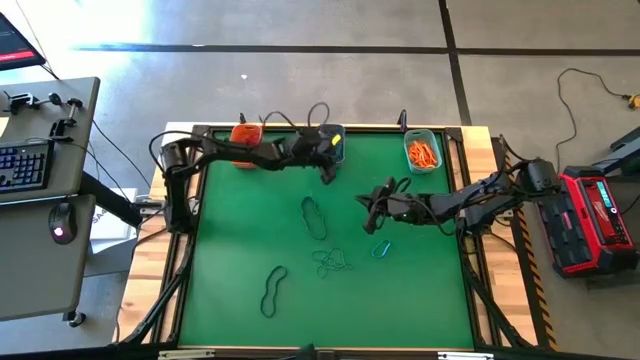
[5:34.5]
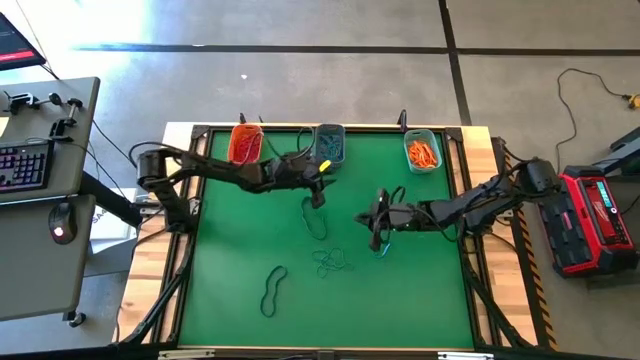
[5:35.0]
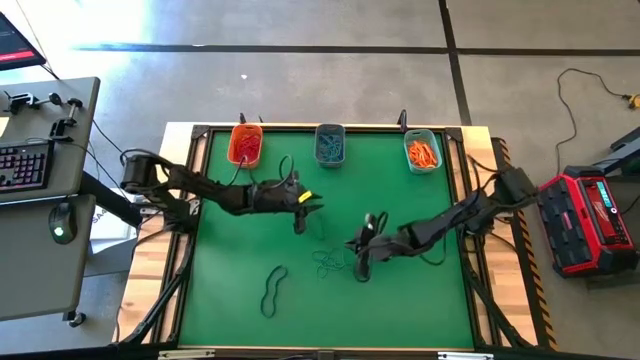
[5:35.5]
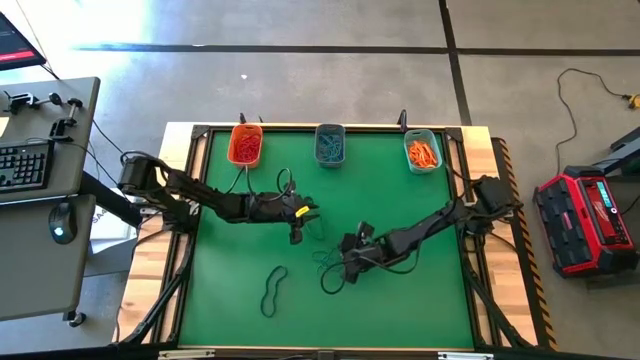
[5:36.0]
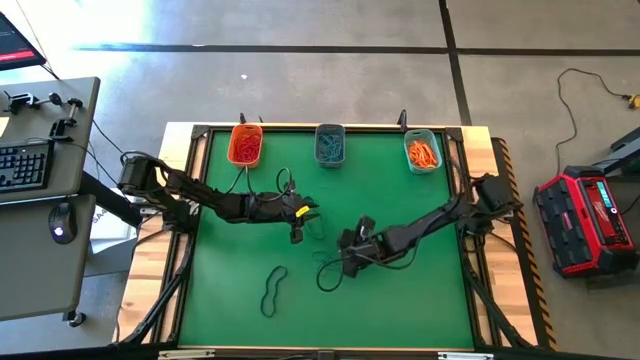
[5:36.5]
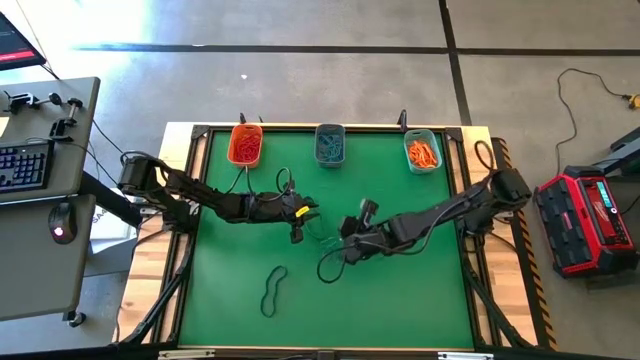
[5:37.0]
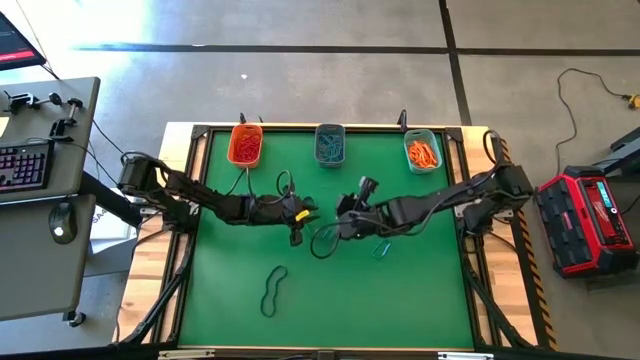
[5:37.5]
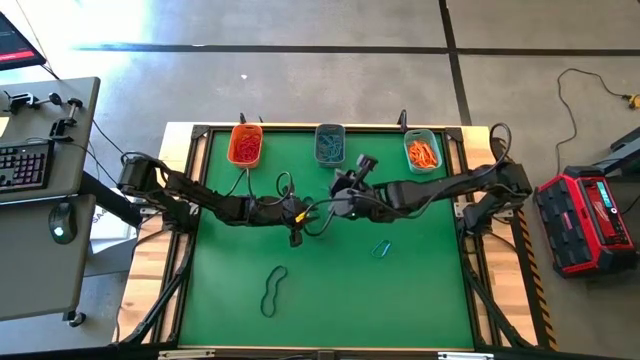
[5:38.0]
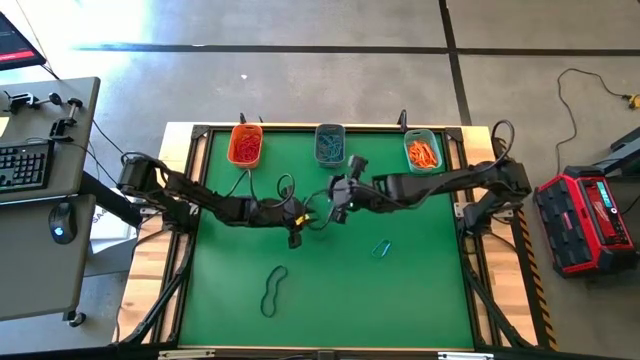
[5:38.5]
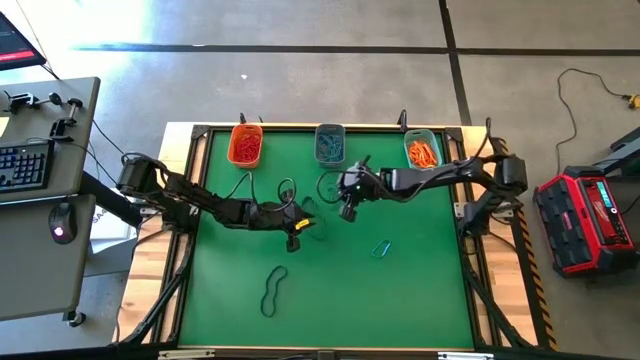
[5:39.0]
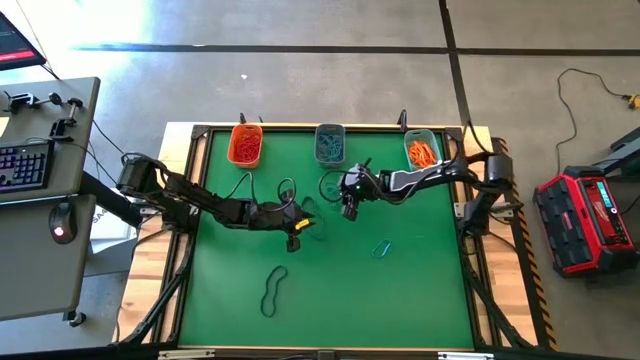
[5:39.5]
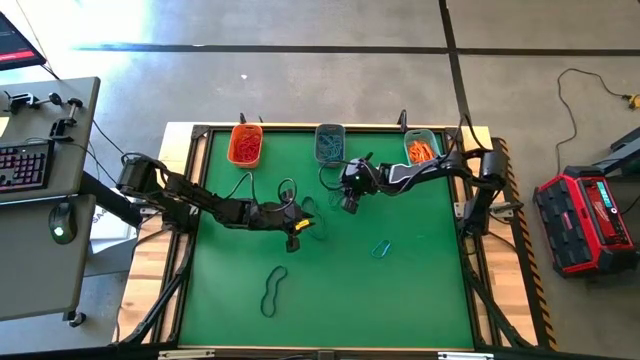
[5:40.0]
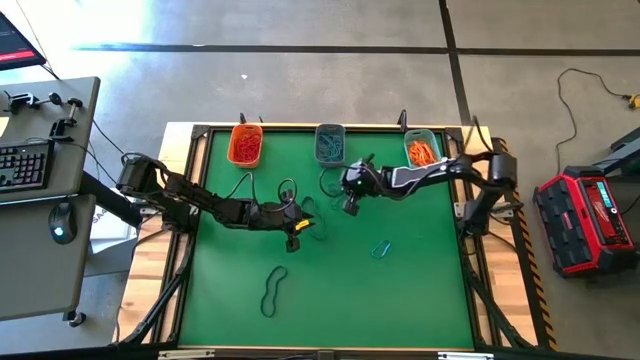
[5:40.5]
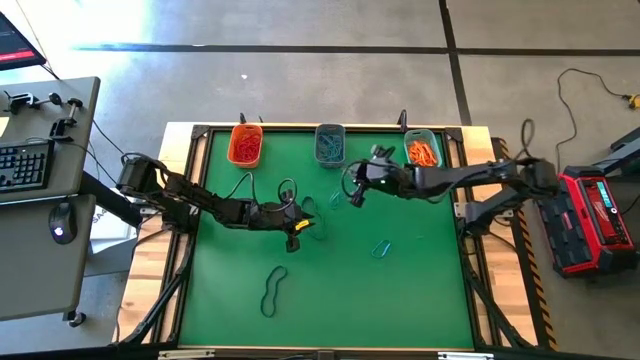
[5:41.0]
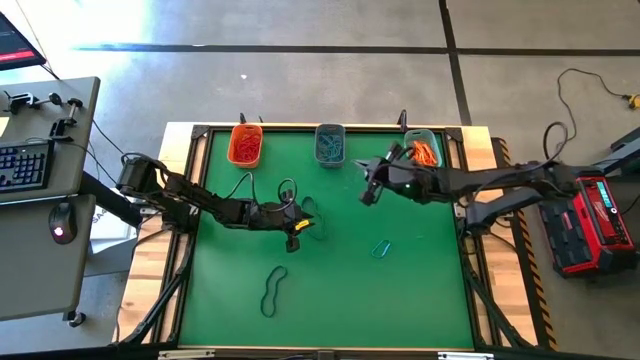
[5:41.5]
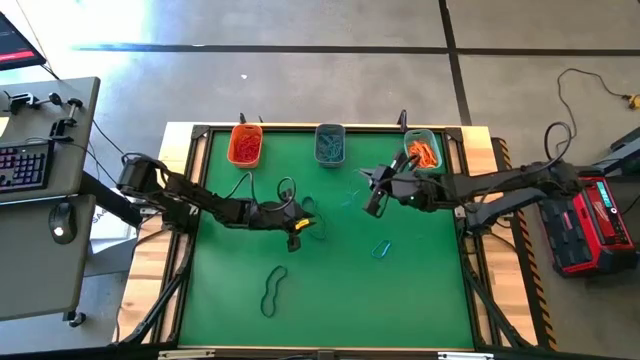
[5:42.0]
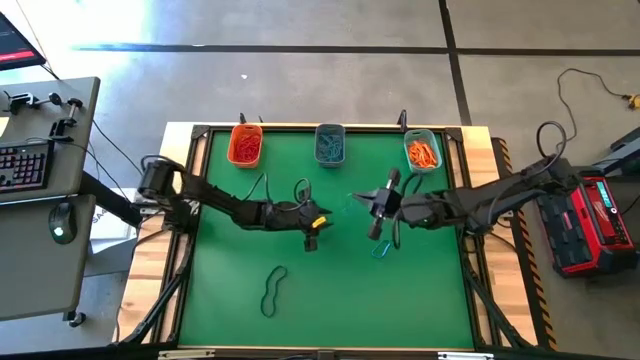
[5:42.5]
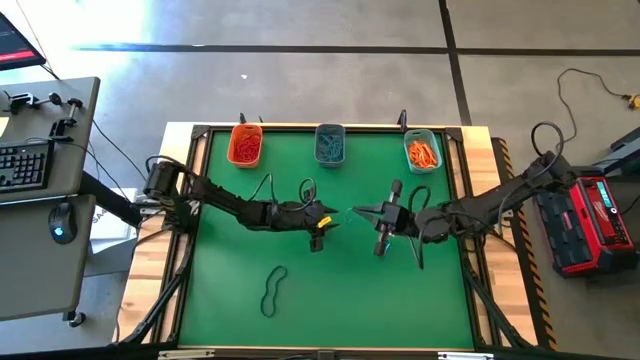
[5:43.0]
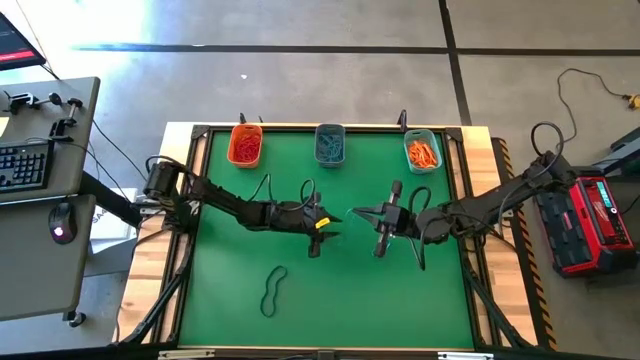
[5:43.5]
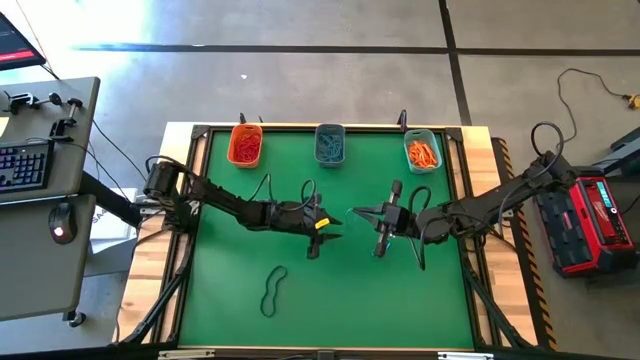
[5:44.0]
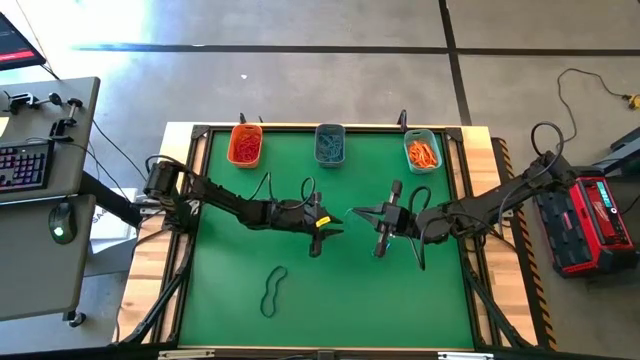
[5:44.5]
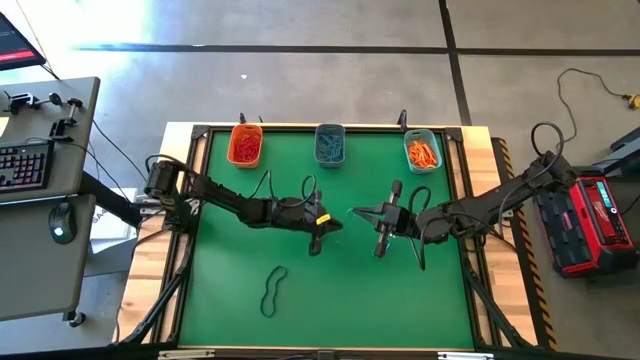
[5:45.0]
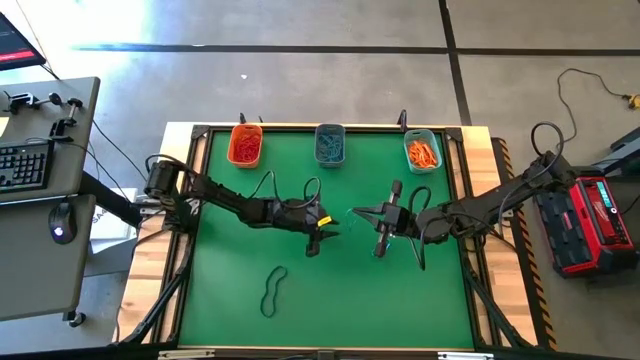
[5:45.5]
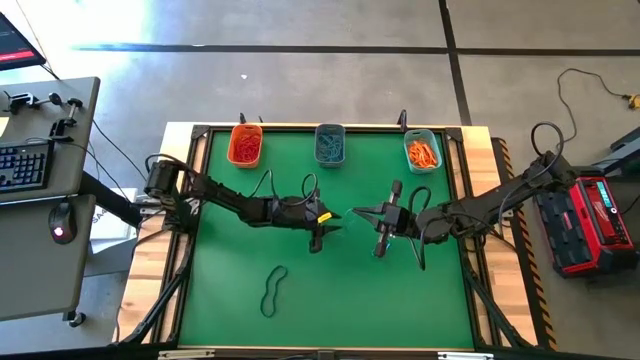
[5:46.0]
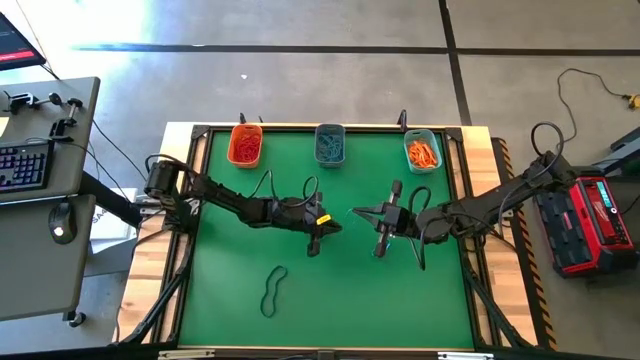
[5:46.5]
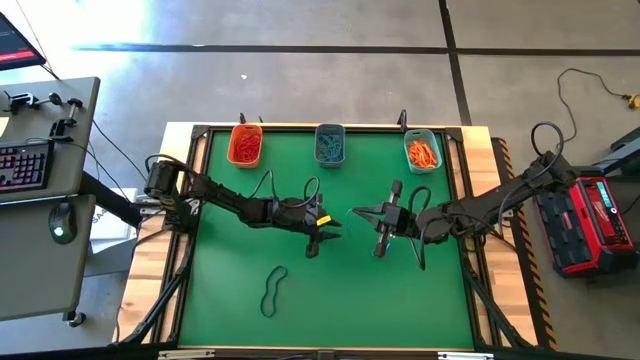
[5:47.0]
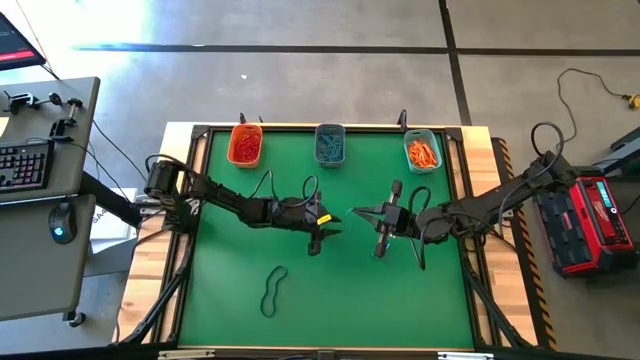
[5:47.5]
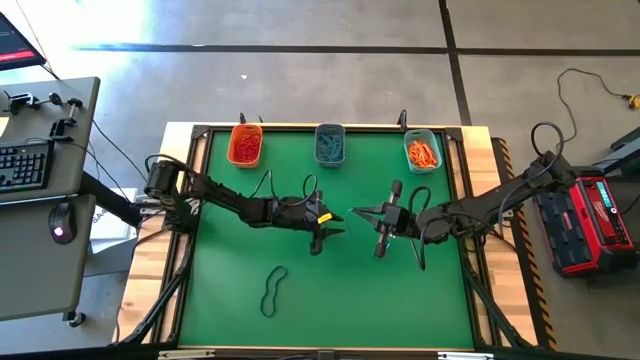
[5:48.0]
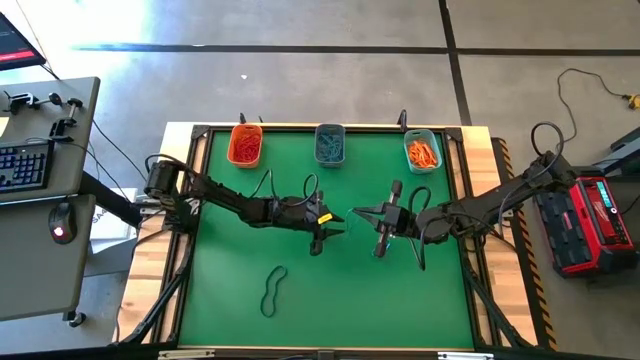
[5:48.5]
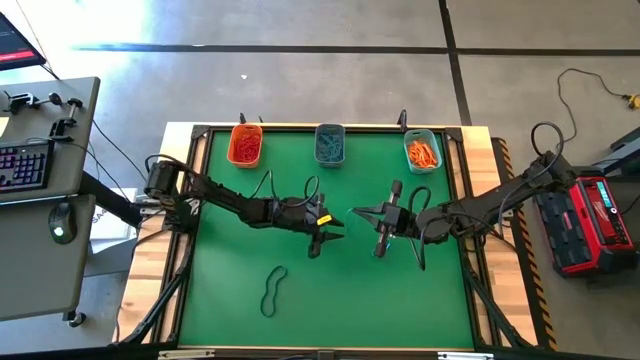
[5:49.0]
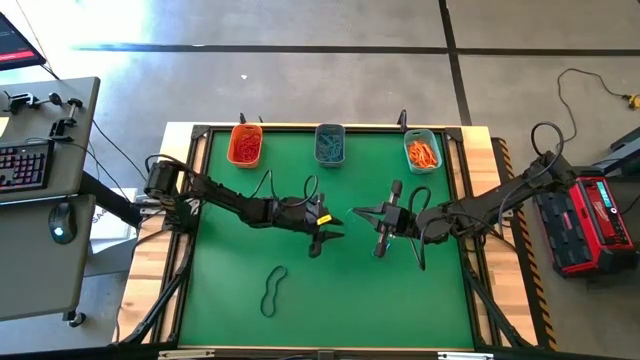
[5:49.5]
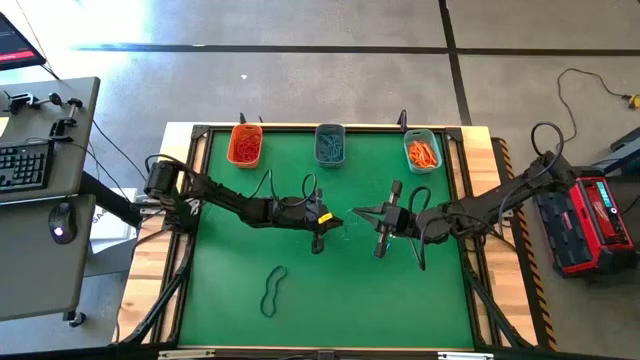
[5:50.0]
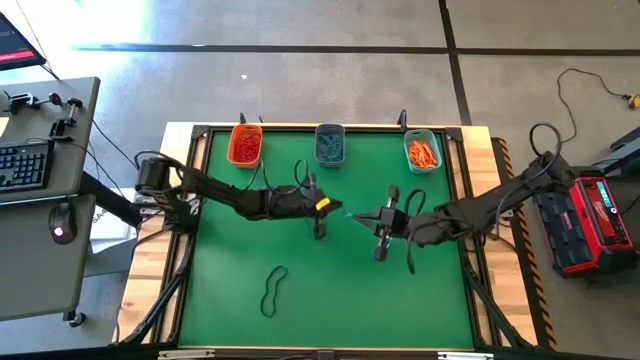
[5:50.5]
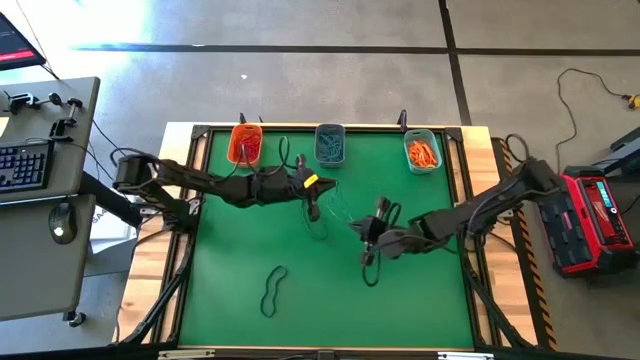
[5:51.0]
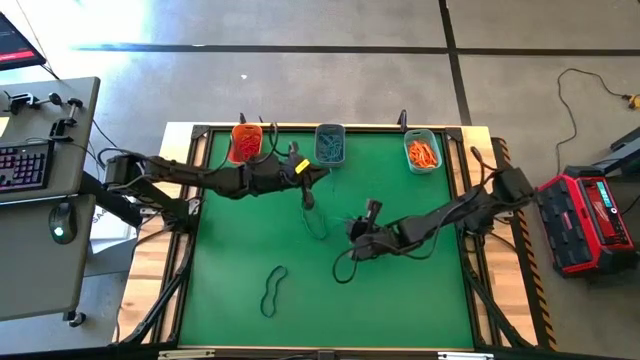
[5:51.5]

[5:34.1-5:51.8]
Task: Sort rubber bands into baskets
Put the blue rubber band into the blue bin

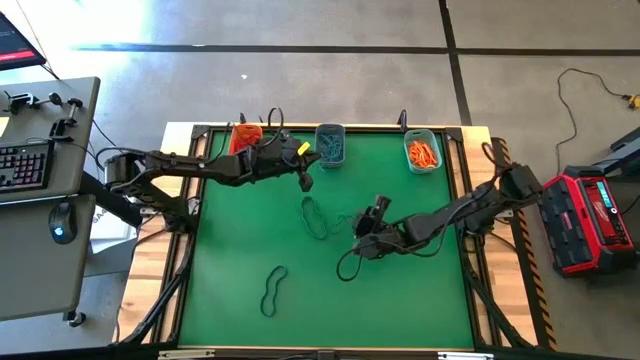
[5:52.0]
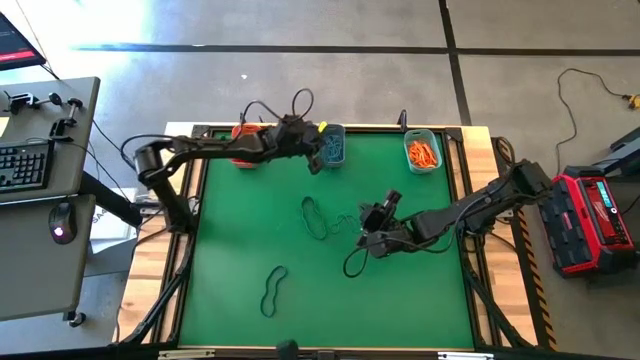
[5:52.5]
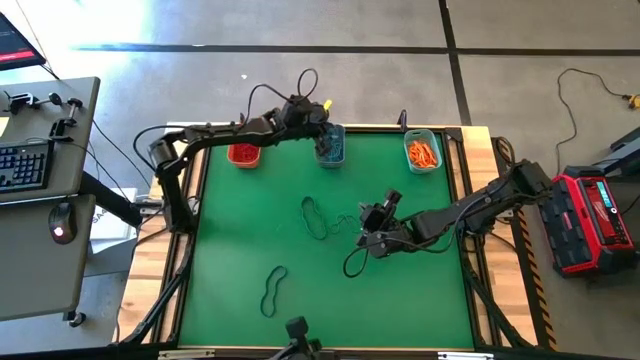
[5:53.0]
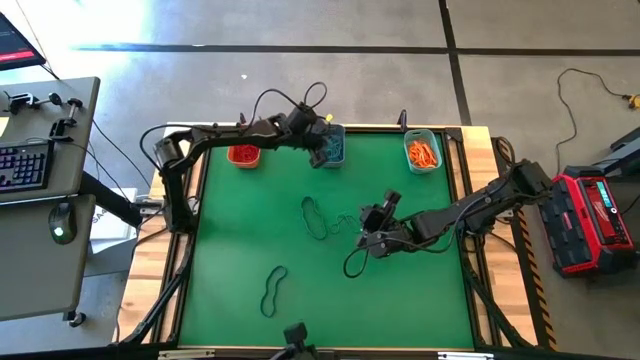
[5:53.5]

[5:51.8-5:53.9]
Put the blue rubber band into the blue bin

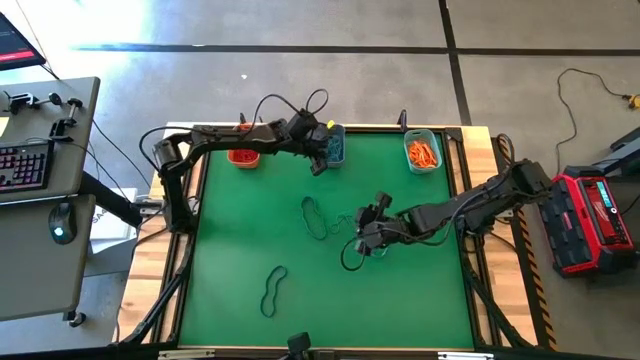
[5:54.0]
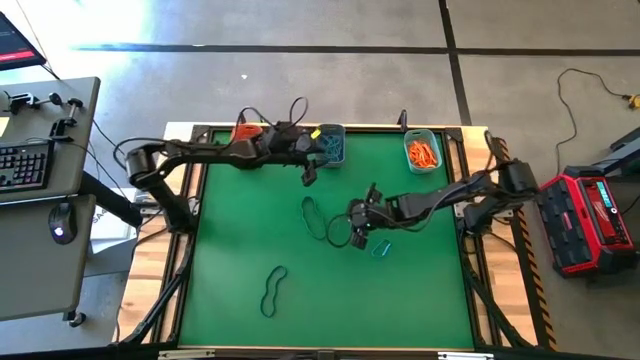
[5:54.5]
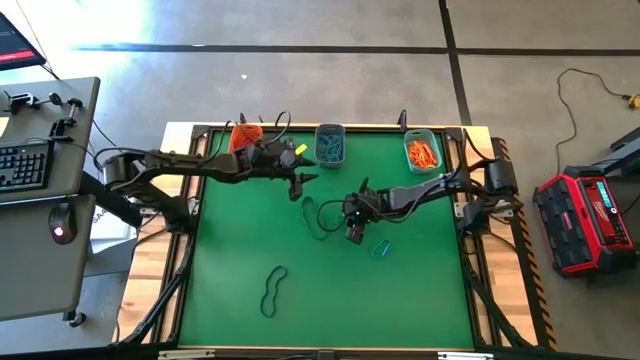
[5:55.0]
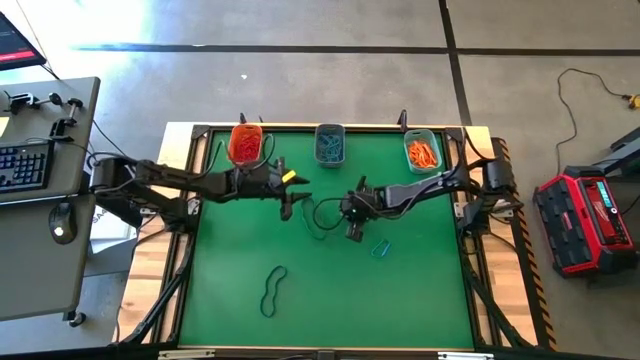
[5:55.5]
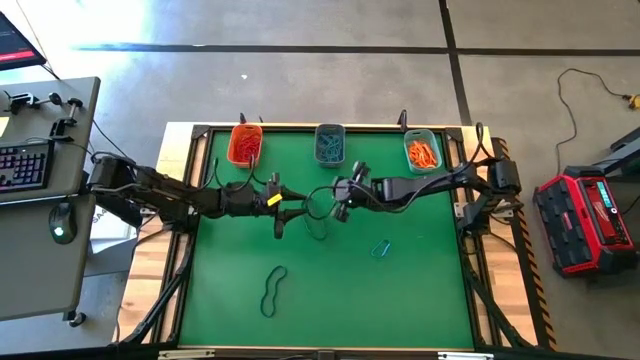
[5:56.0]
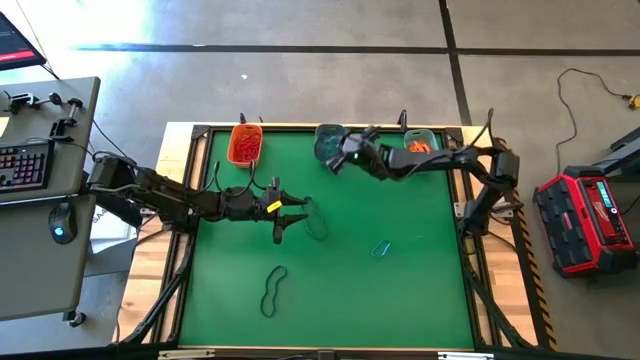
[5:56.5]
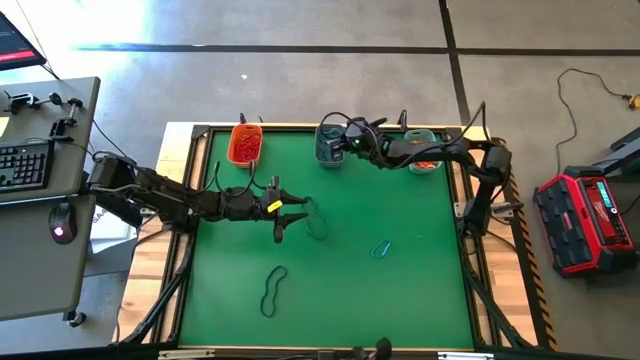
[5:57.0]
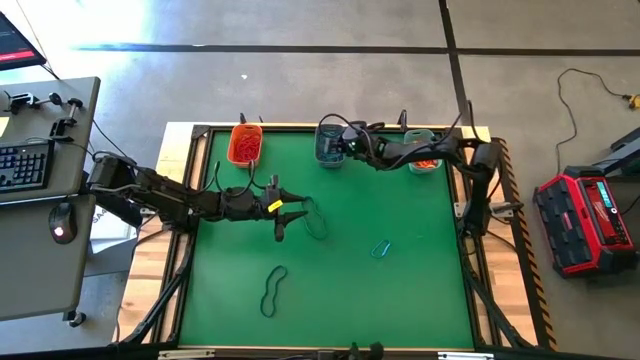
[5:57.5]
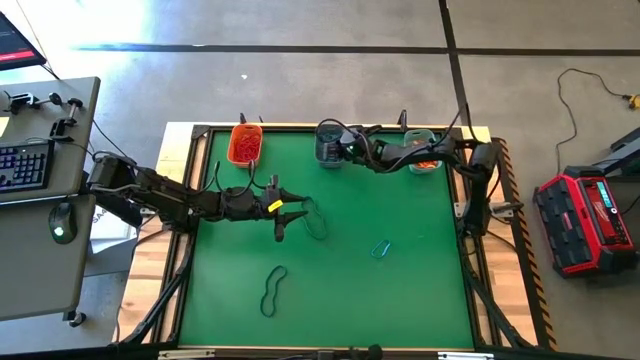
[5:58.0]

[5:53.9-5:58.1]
Put the blue rubber band into the blue bin
